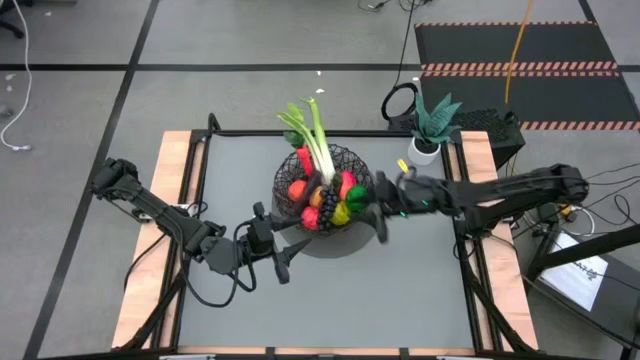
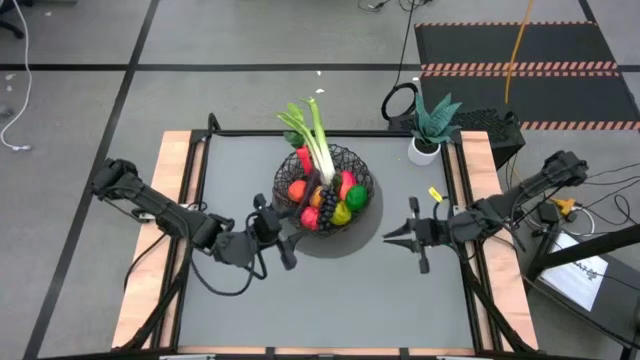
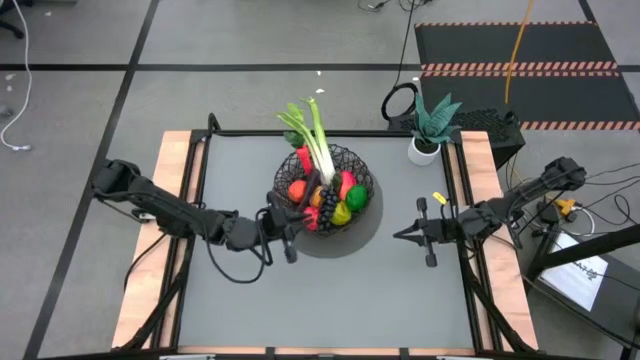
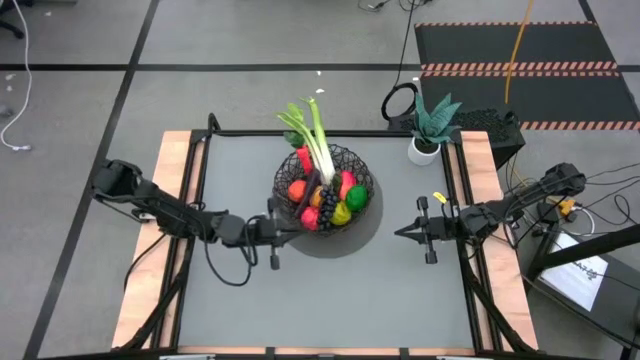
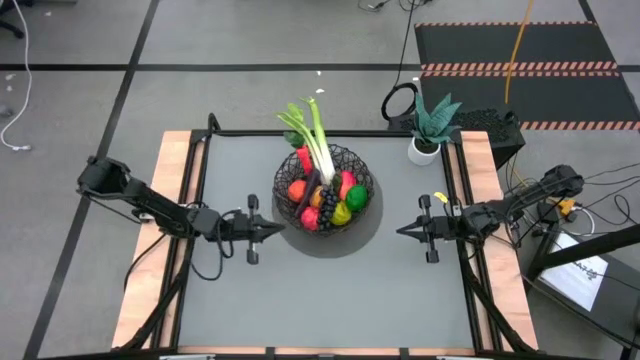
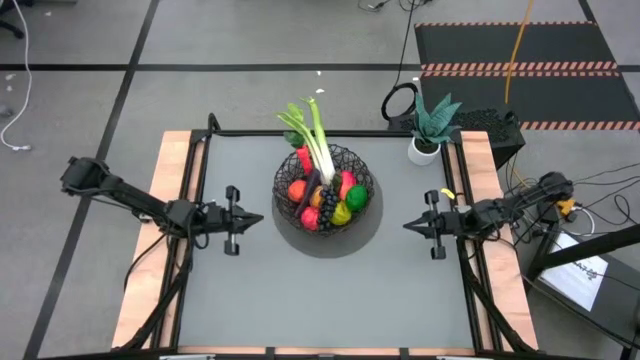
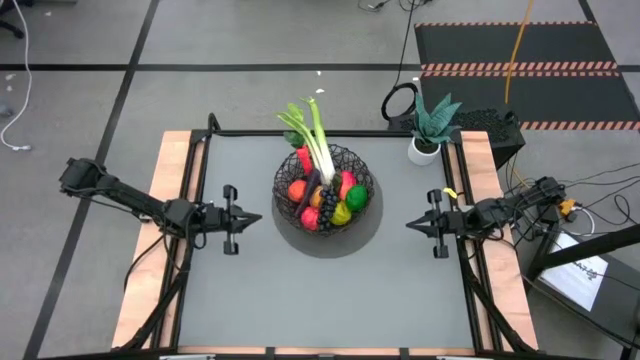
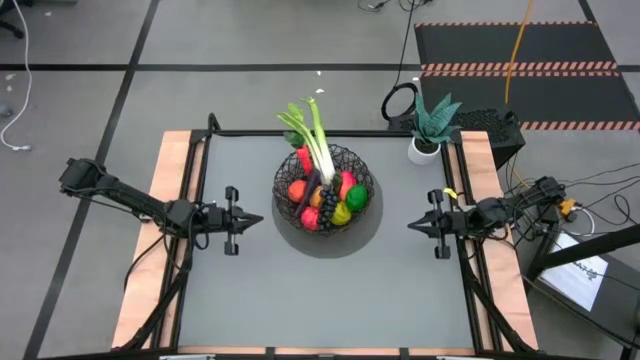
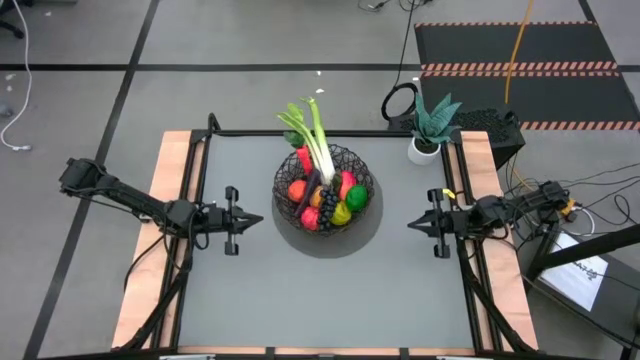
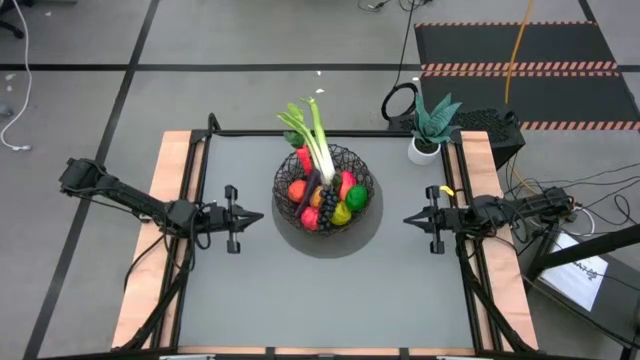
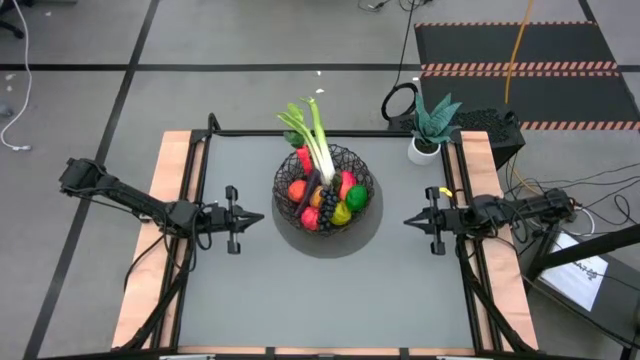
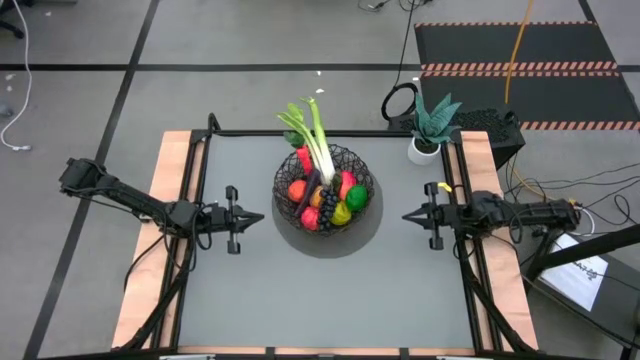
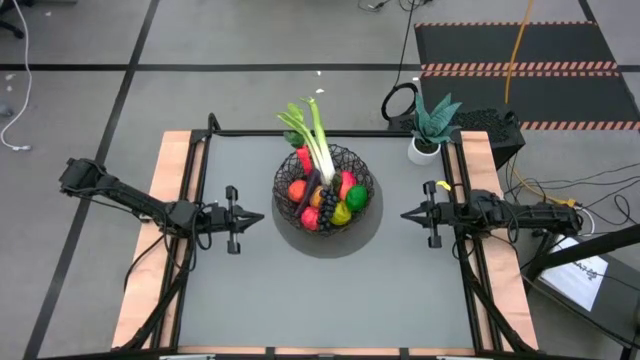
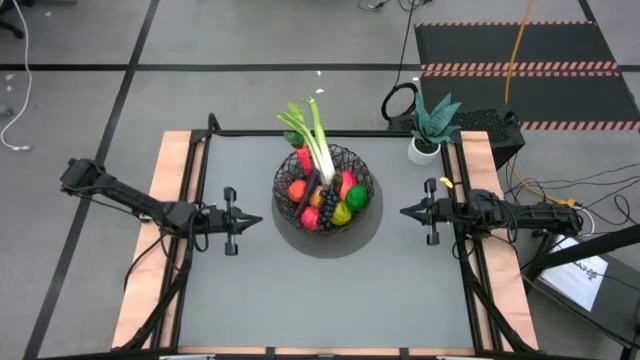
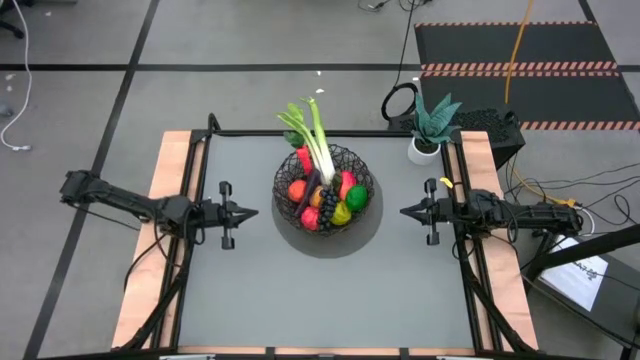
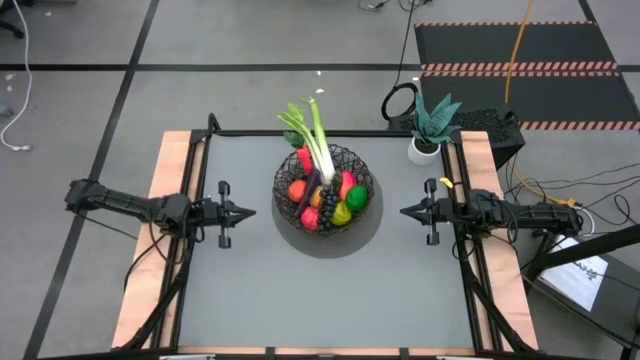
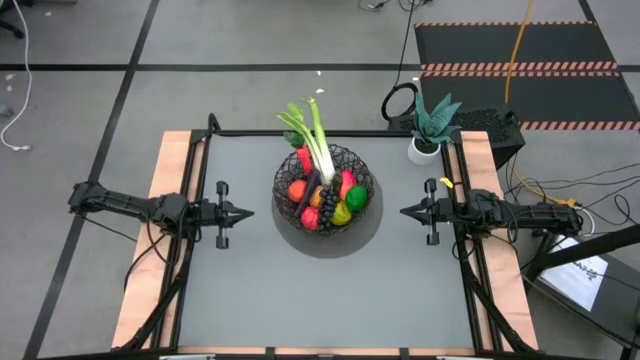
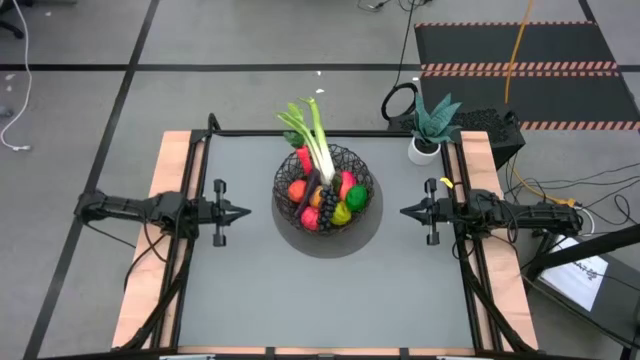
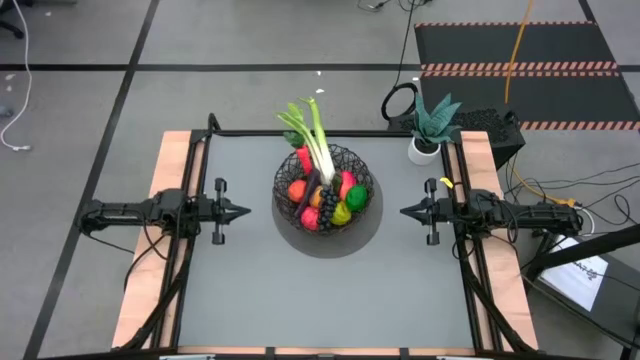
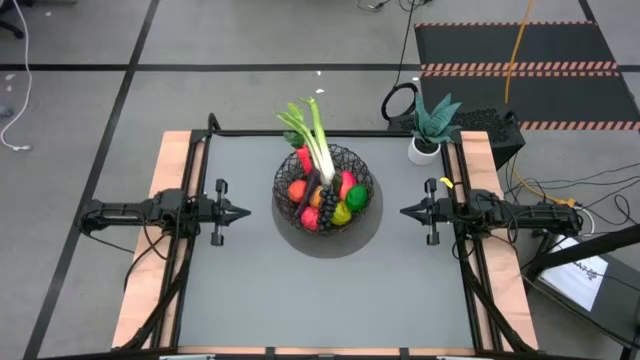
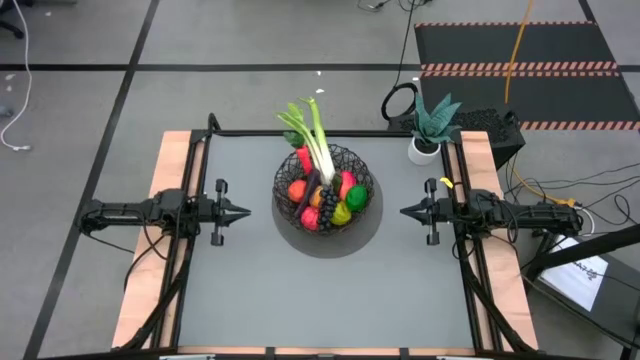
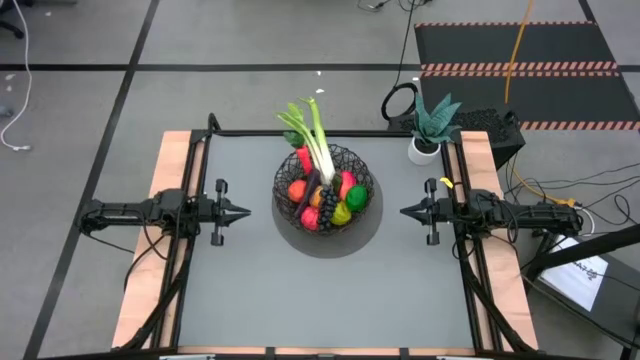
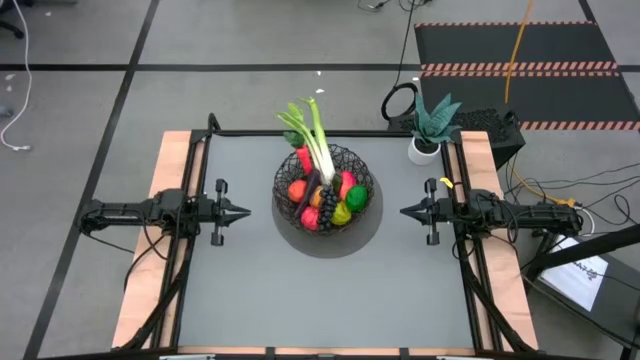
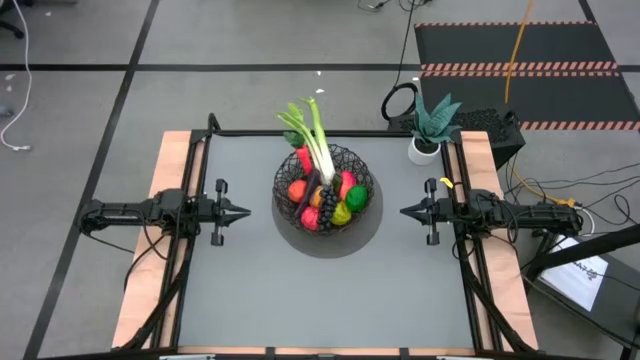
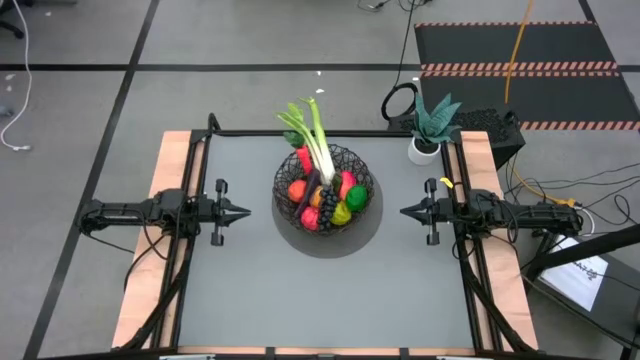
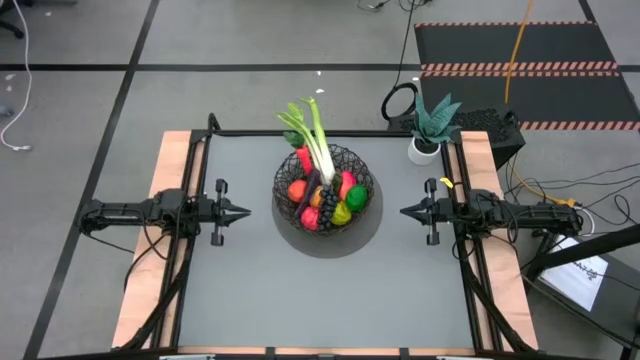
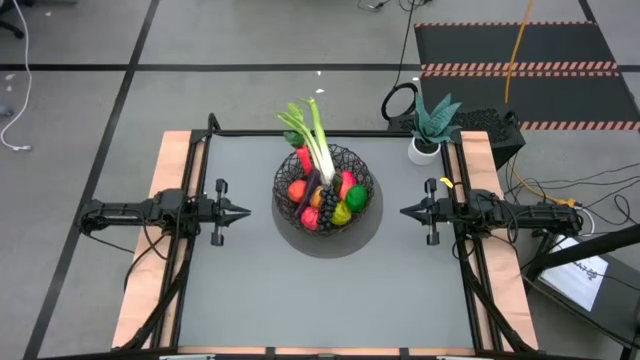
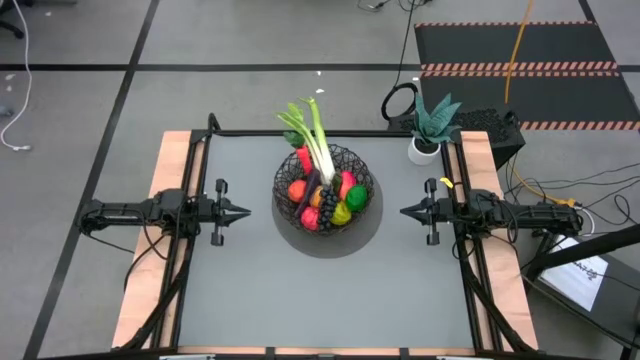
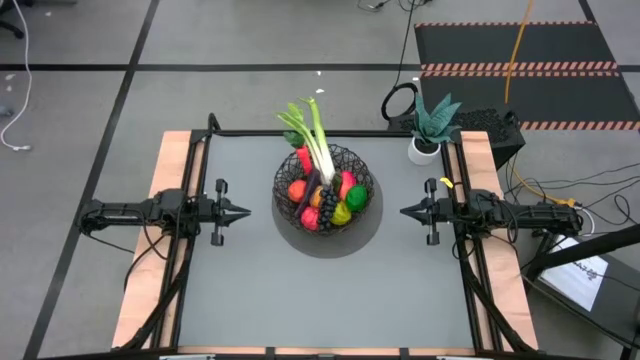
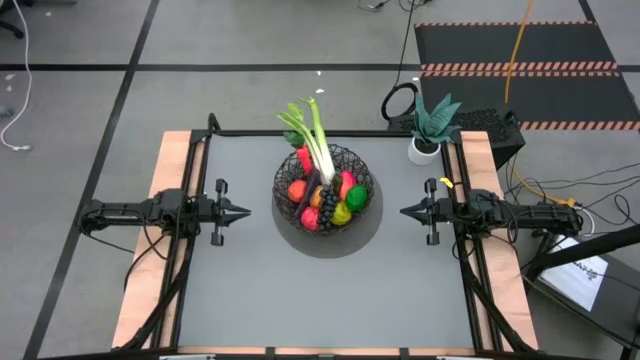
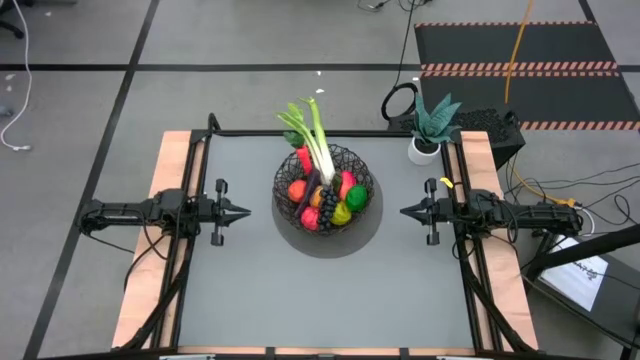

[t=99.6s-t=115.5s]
Task: Build produce basket
Return to Home Position

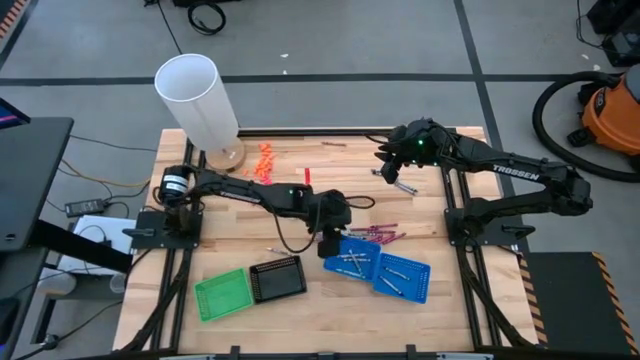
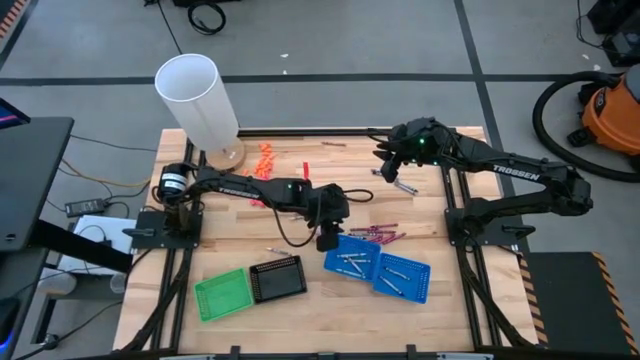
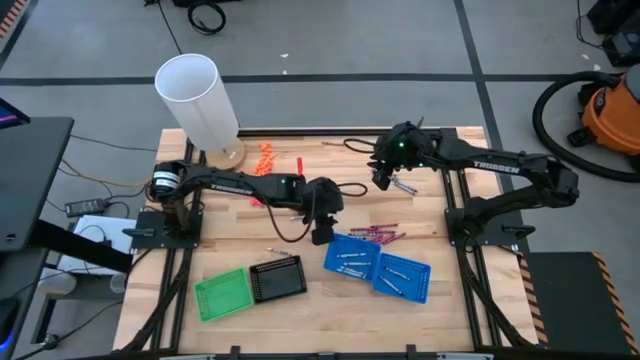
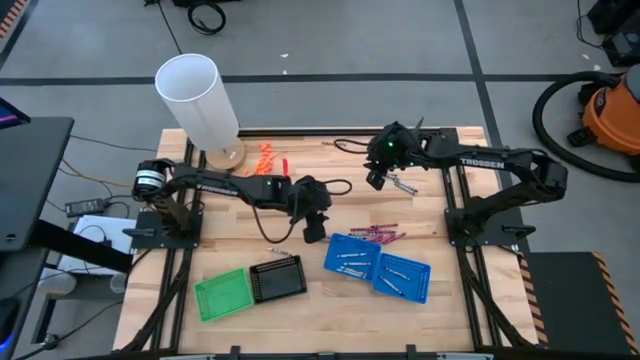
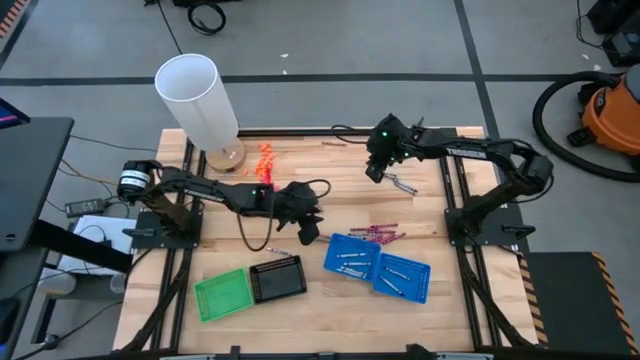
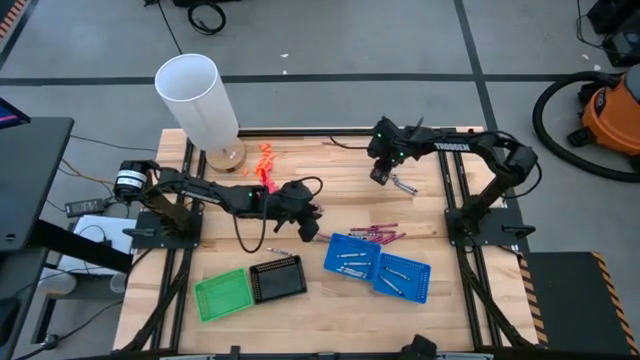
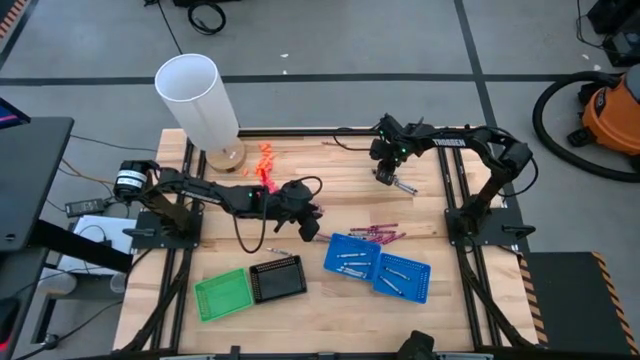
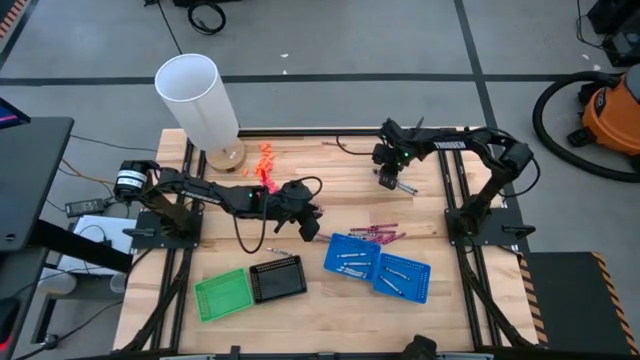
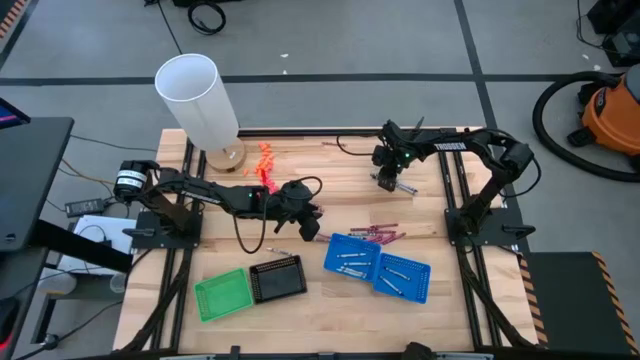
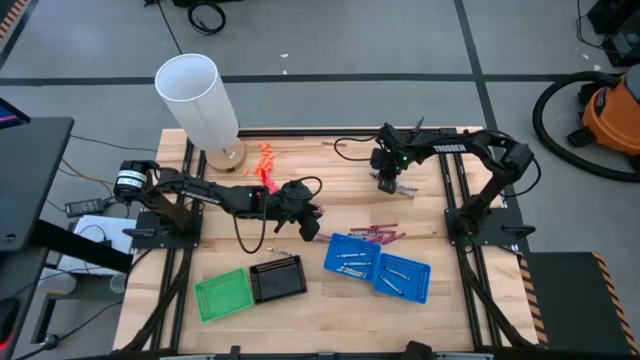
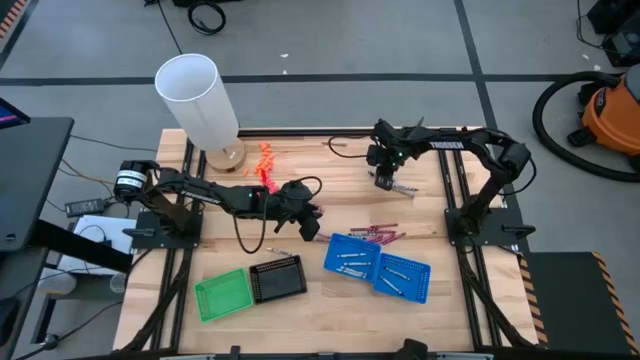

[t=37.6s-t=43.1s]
Task: Sort crayons
Put the black crayon into the right blue bin
